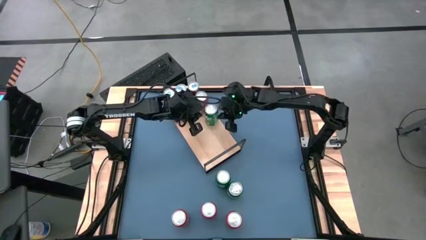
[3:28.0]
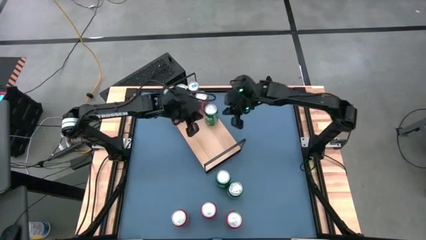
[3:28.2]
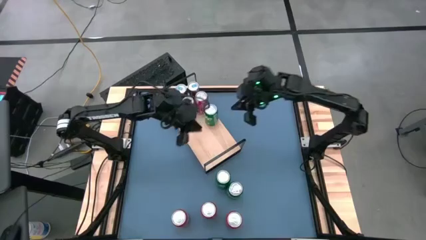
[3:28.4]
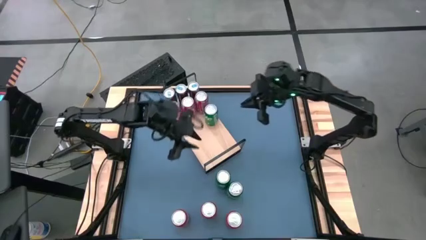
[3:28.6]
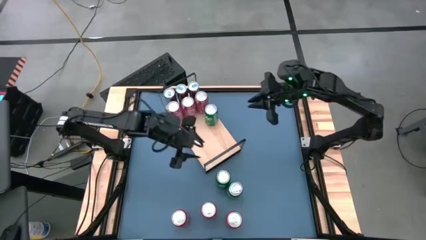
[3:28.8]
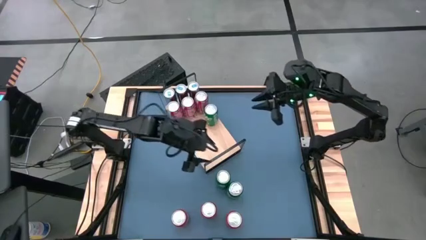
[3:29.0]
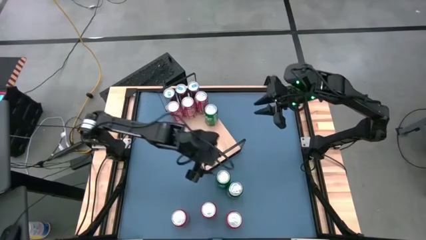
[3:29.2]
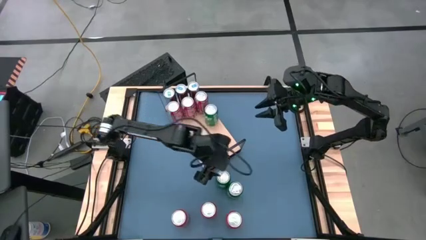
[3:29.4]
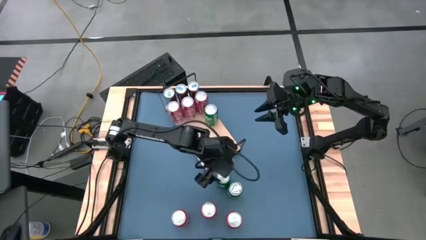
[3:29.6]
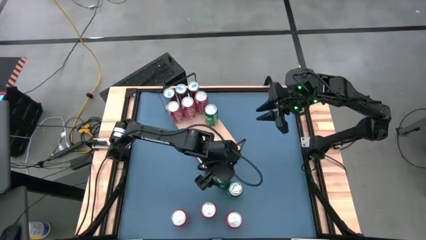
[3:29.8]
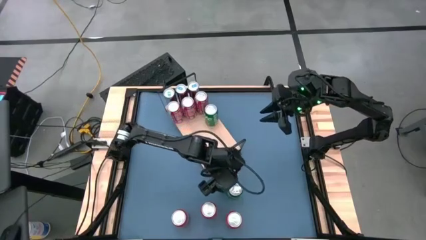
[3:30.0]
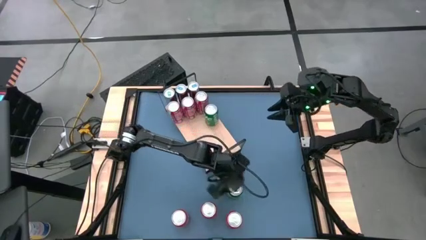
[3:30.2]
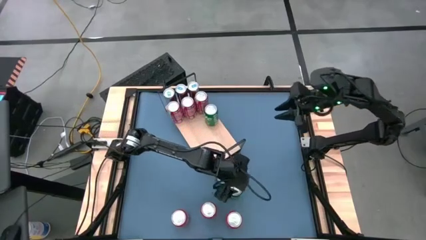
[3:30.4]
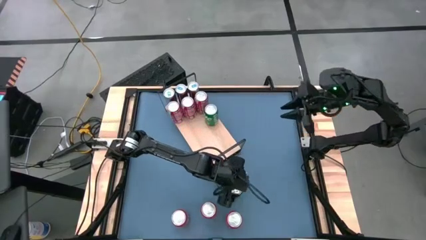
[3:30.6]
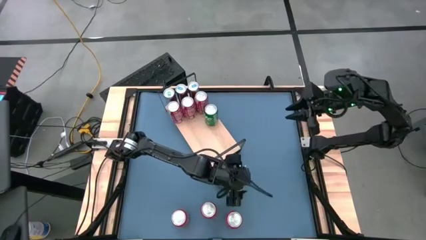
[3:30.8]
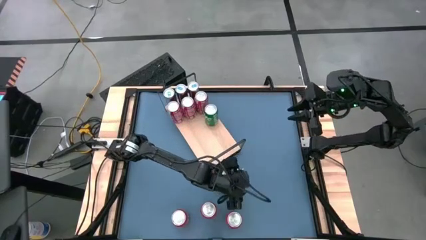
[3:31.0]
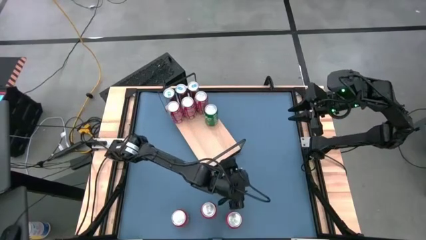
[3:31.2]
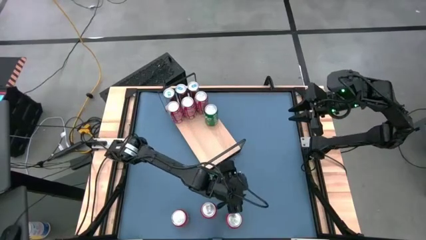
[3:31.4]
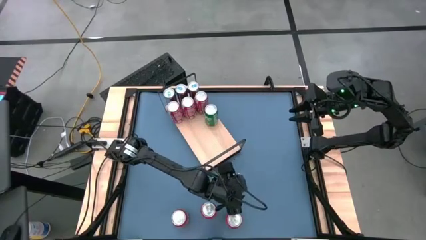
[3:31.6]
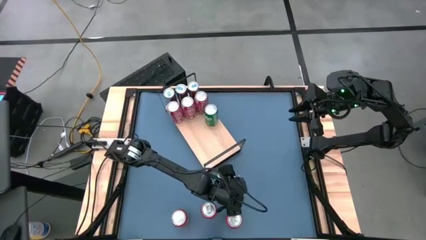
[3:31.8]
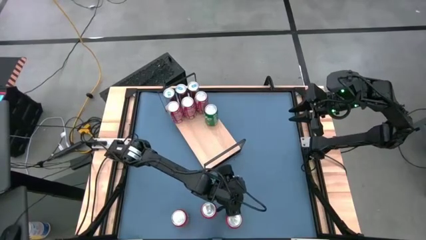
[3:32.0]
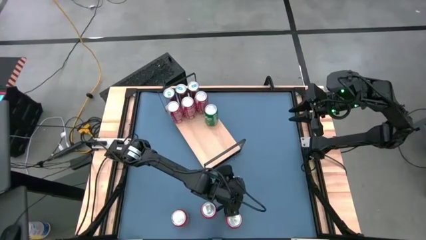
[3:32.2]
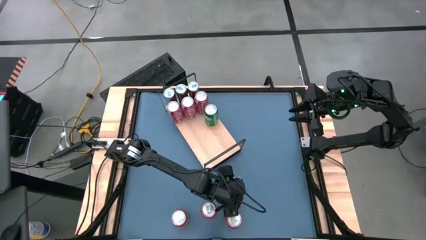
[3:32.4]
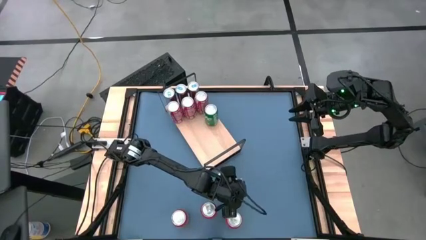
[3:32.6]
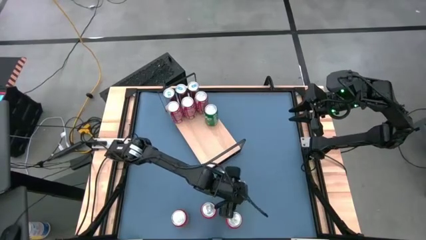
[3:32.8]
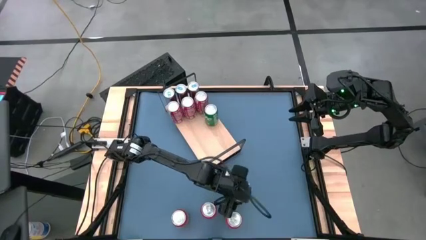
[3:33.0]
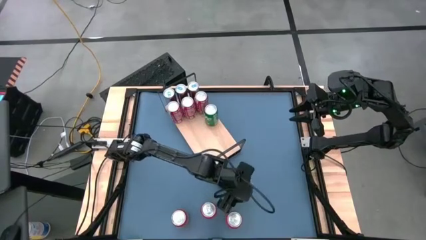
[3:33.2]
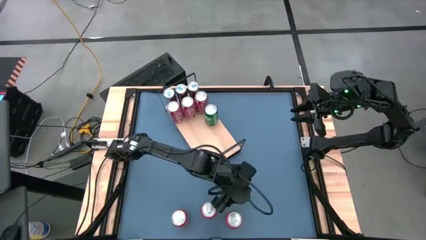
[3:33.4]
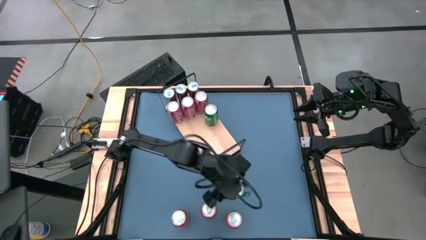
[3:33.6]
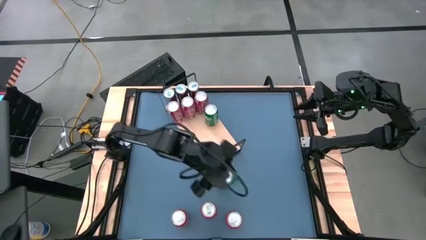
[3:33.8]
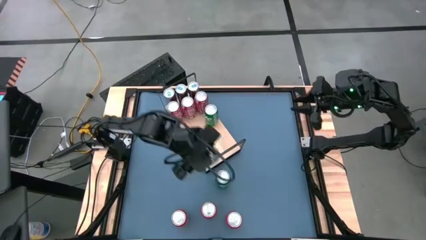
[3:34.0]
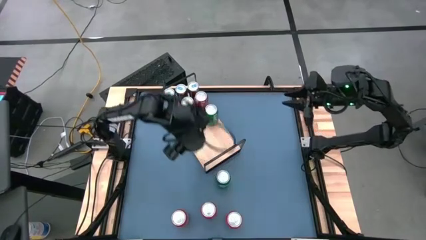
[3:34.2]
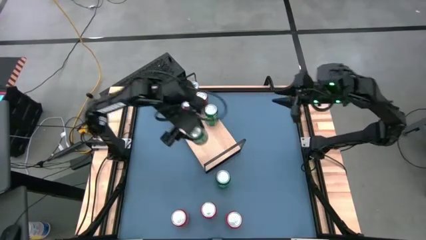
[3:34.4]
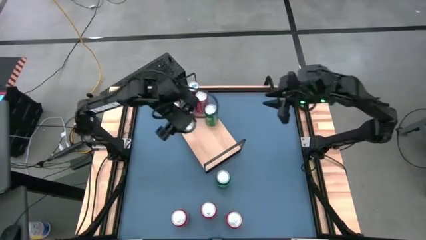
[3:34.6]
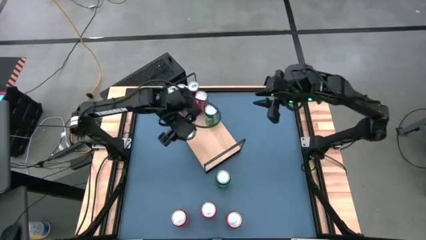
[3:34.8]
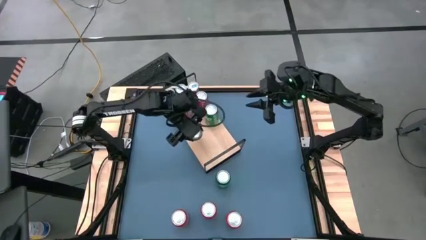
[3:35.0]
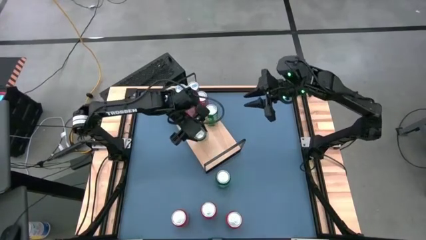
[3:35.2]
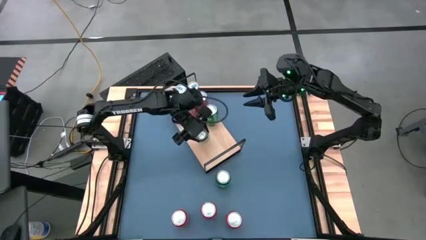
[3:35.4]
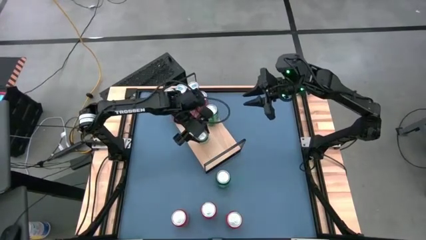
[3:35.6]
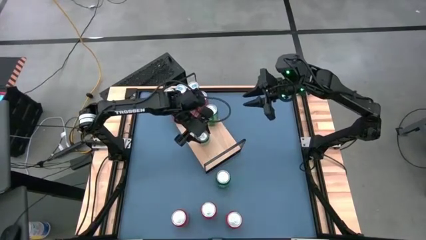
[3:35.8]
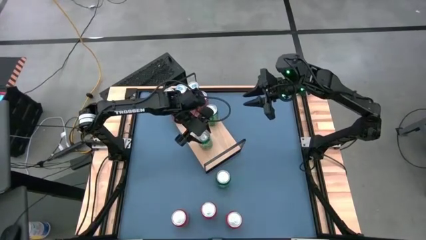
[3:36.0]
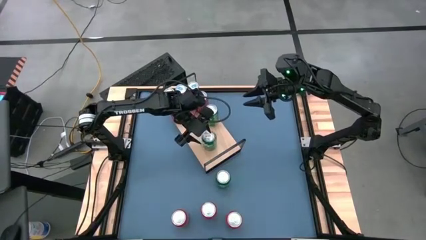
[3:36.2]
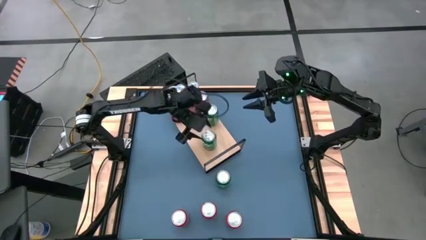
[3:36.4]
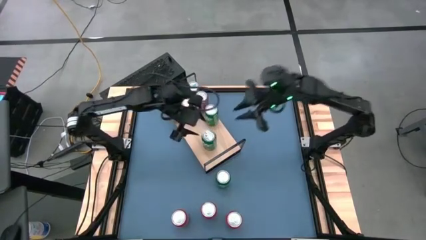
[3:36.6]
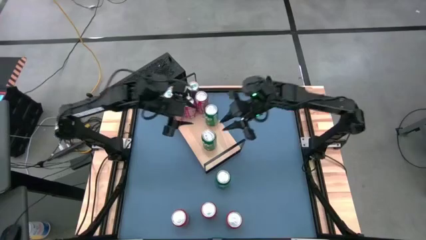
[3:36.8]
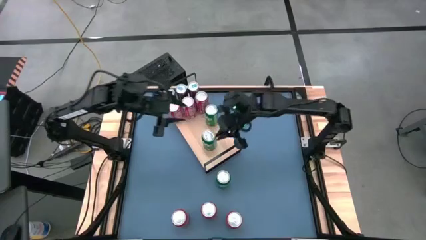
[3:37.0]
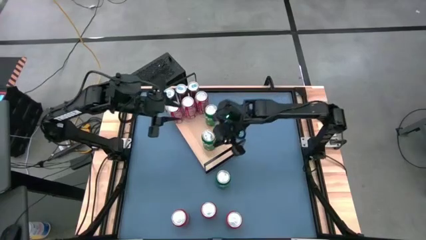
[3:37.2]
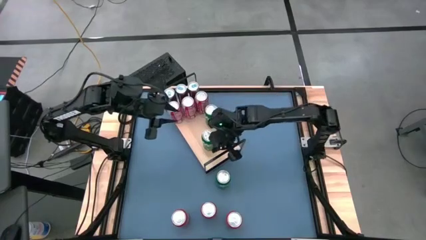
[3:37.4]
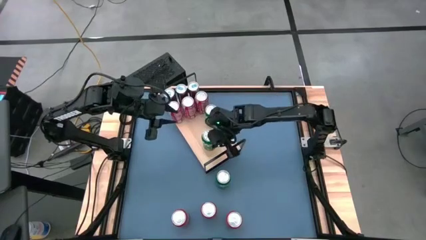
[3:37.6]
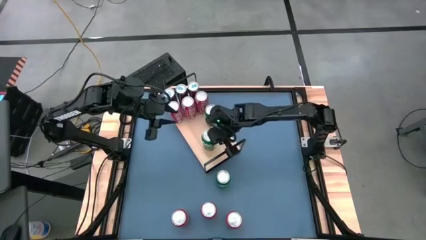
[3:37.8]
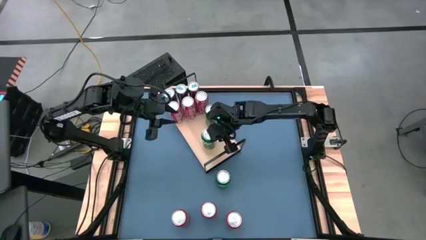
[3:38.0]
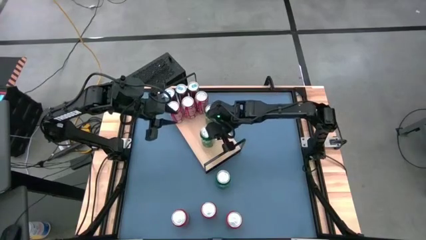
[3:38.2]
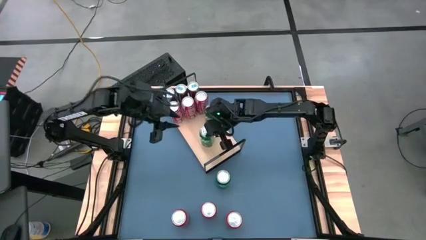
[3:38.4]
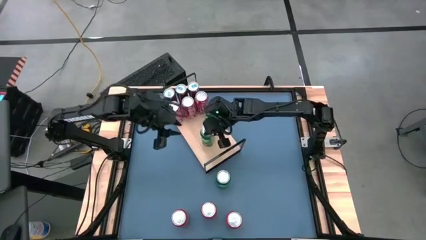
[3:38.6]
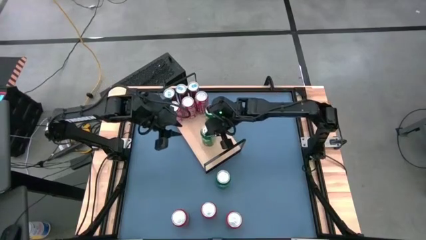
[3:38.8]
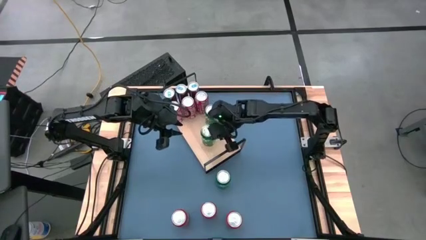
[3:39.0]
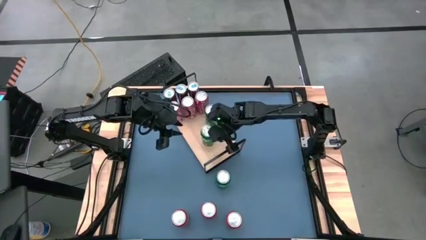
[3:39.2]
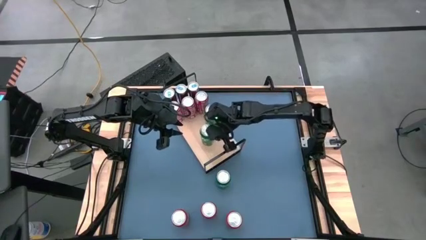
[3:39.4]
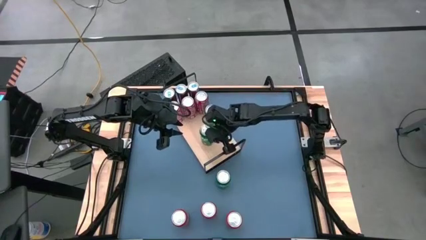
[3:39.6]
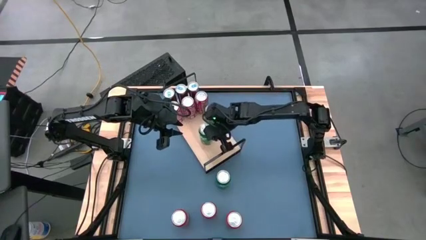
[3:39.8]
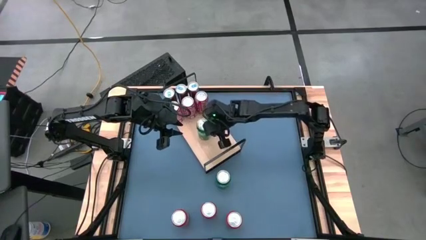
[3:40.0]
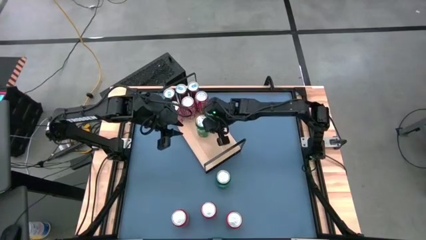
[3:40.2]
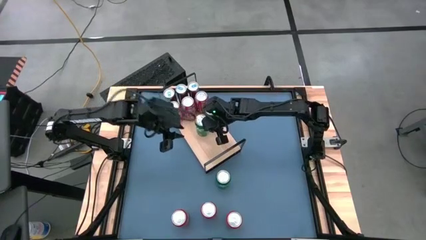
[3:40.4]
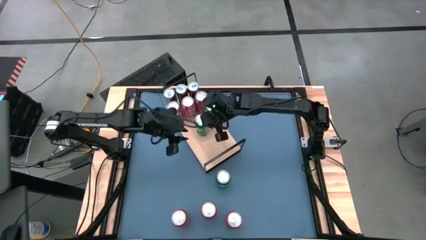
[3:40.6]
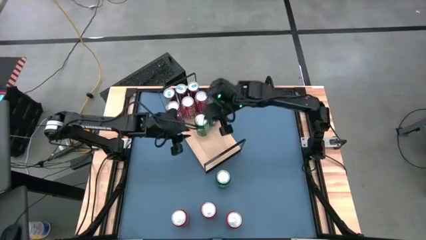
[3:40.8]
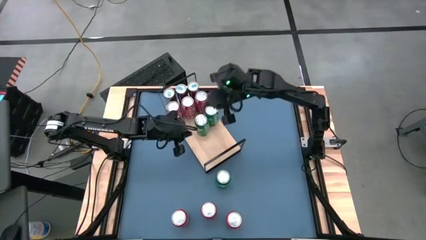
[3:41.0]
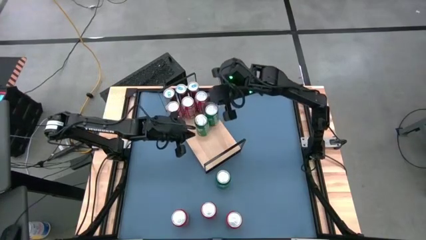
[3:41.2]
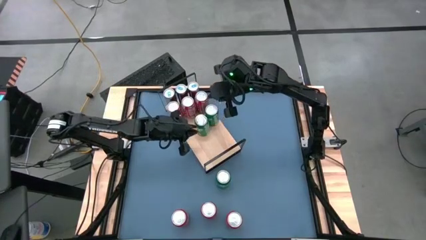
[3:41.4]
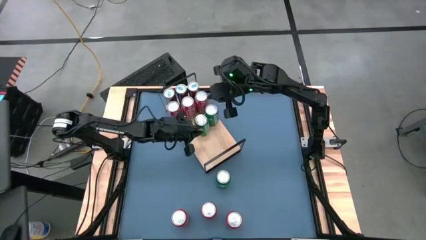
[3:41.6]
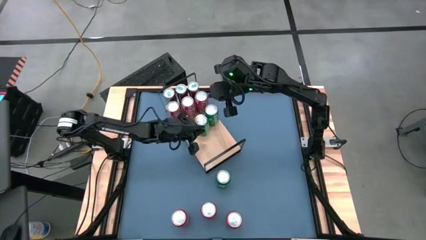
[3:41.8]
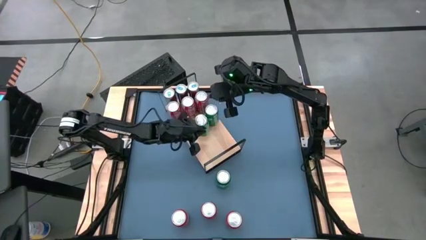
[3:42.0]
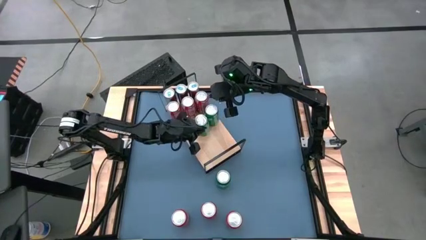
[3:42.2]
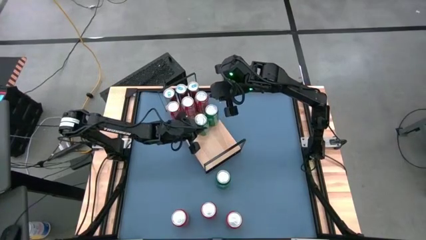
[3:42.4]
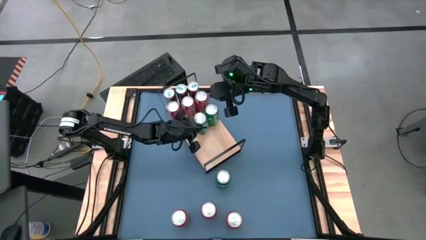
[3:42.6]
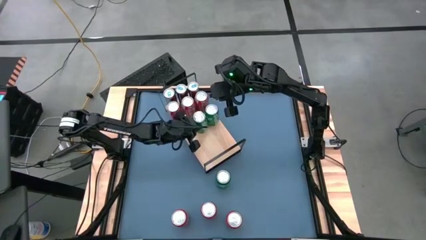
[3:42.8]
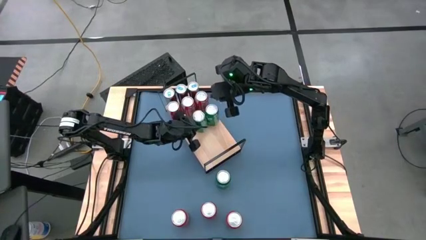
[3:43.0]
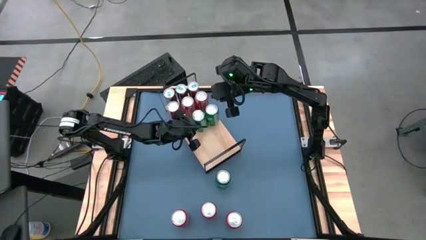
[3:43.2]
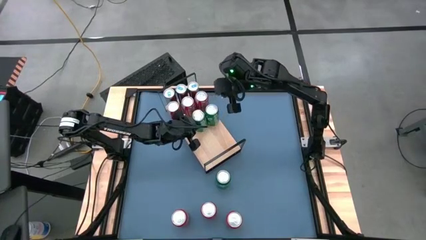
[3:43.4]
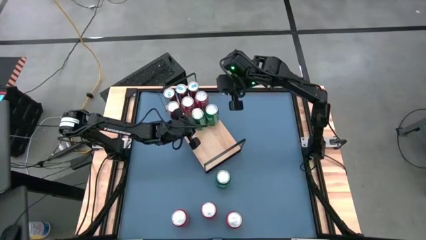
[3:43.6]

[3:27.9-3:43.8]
Task: Place canned beverage on shelf
Put the right green soda can on the shelf aligned with the other green soda can

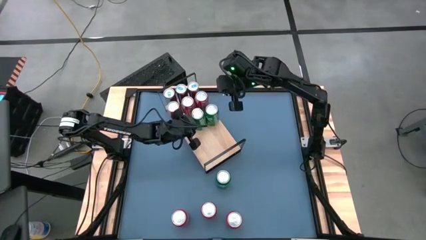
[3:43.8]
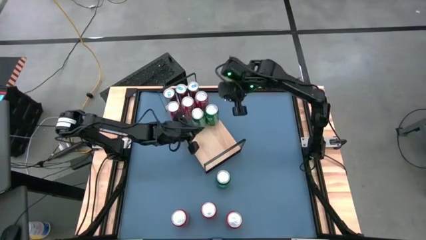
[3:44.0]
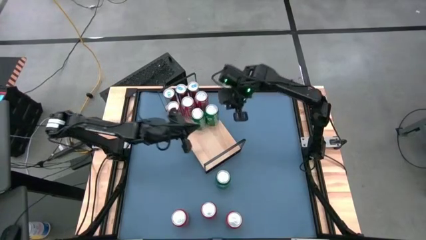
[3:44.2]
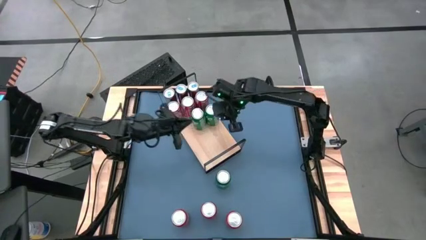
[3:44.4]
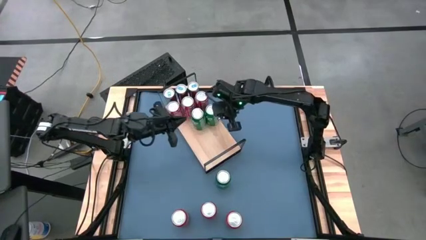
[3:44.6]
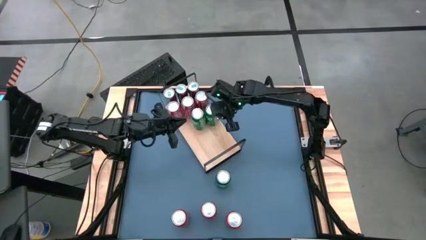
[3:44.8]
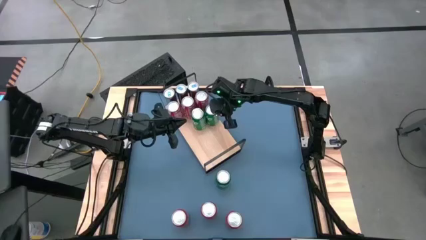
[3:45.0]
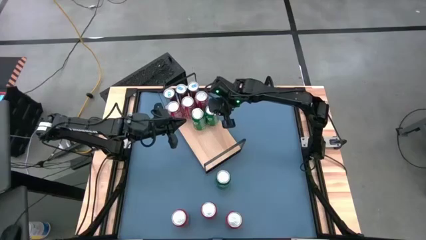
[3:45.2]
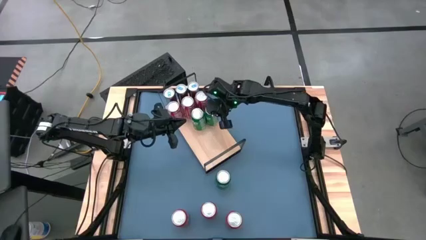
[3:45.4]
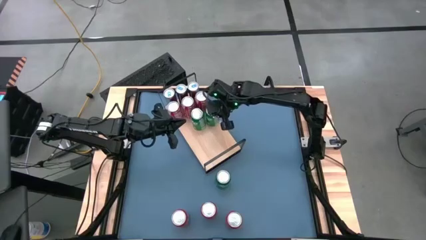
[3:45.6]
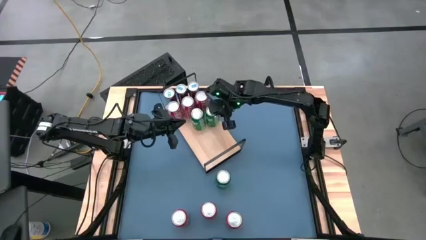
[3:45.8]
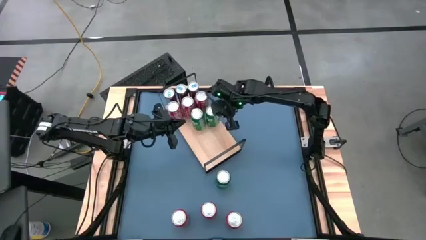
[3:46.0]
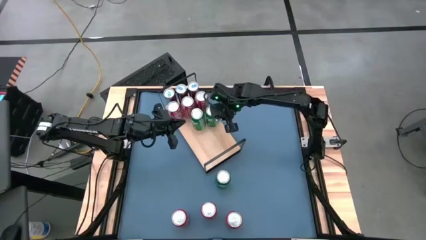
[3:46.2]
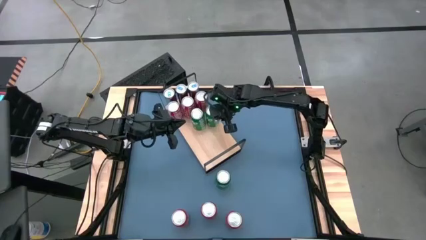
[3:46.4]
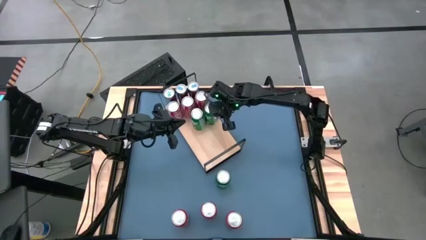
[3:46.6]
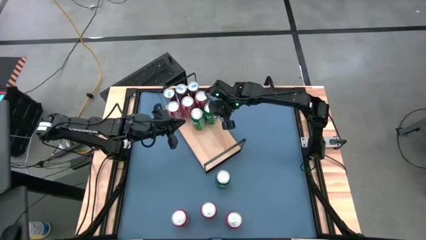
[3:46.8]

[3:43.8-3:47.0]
Adjust the green soda can on the shelf
